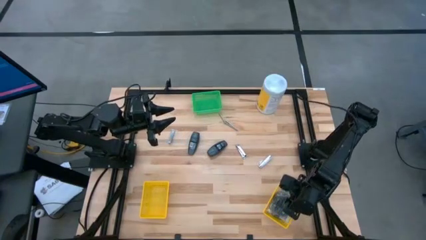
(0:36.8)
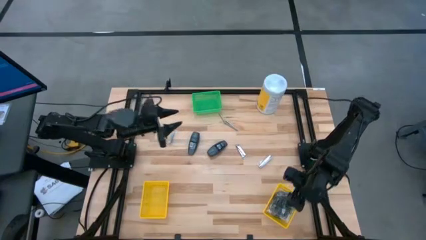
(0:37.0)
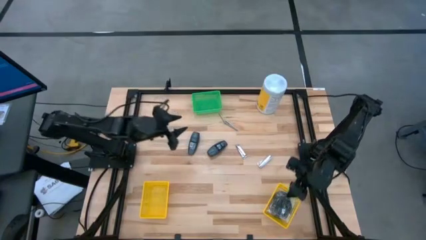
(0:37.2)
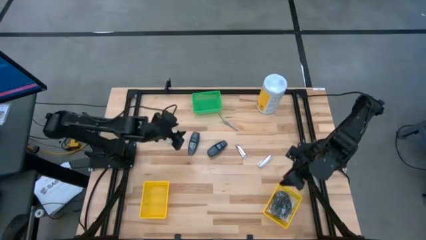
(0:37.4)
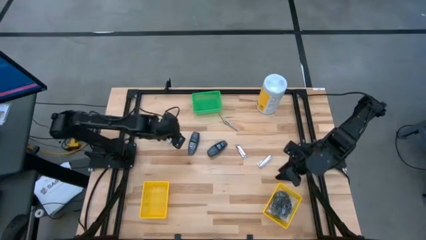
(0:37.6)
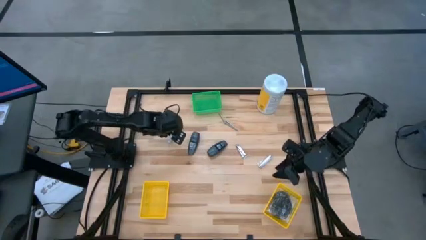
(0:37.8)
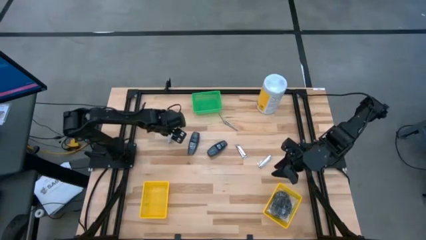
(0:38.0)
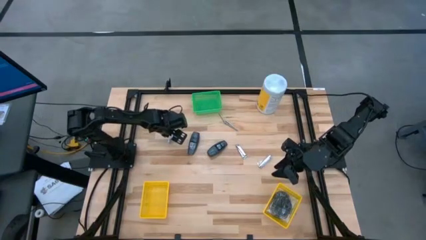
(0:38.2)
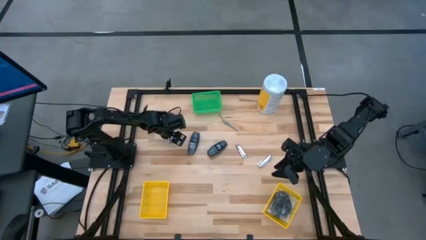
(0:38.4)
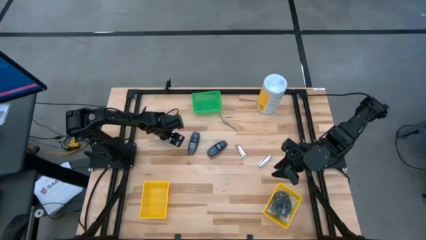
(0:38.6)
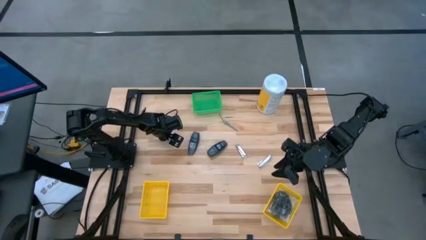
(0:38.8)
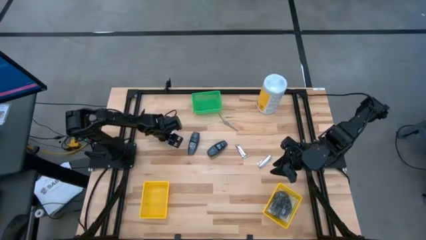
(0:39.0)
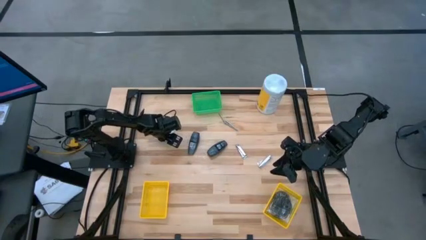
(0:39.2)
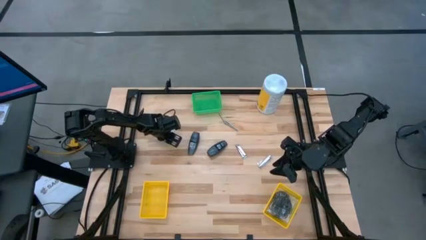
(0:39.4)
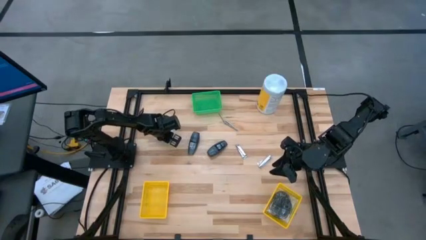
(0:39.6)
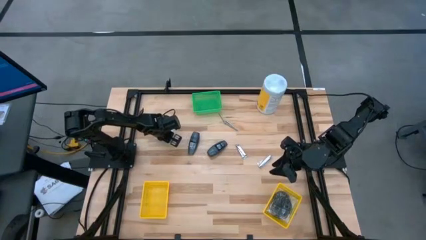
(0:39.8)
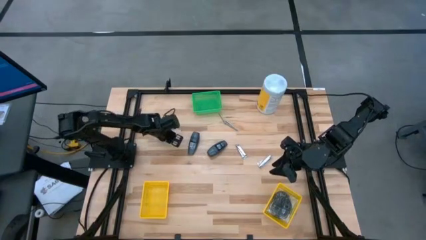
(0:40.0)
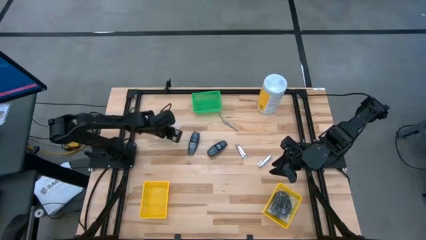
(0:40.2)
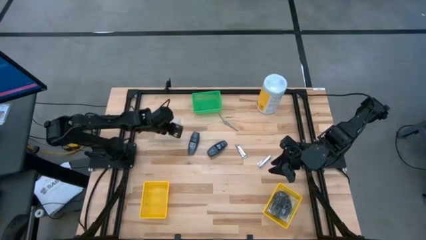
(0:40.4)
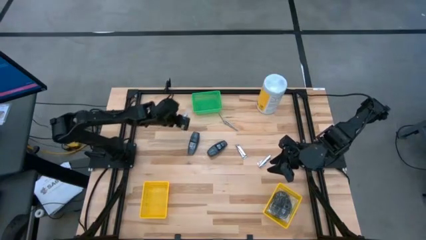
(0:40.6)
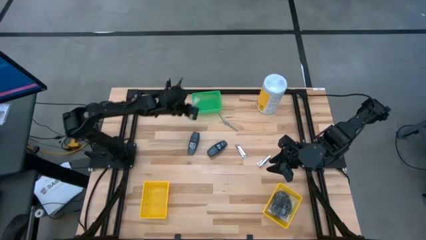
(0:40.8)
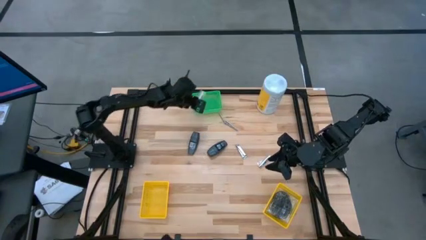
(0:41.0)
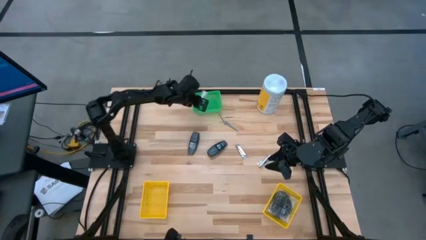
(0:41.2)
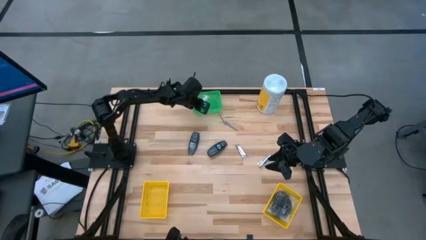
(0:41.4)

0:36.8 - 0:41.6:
Task: Pick & Place Travel size toiletries
Put the silver nail cutter into the green bin

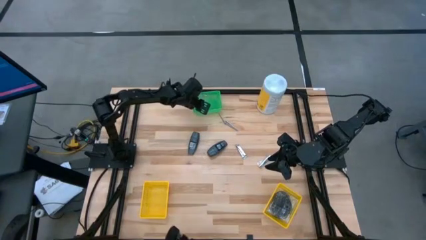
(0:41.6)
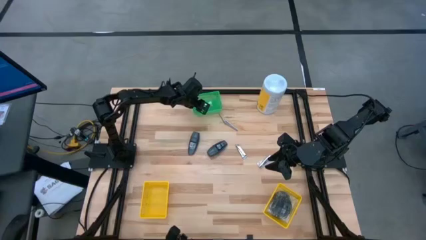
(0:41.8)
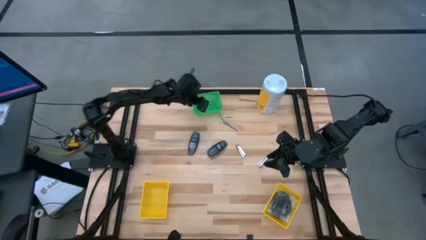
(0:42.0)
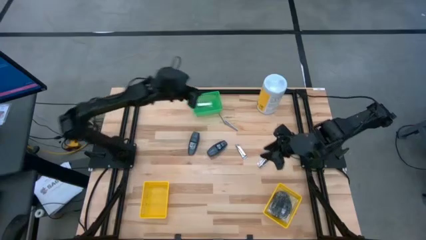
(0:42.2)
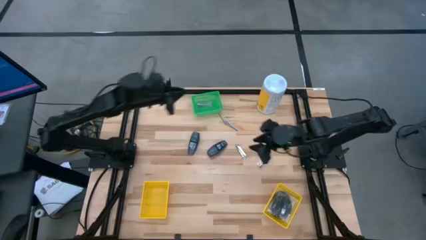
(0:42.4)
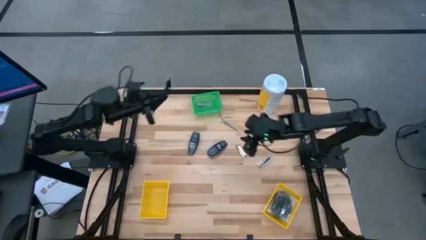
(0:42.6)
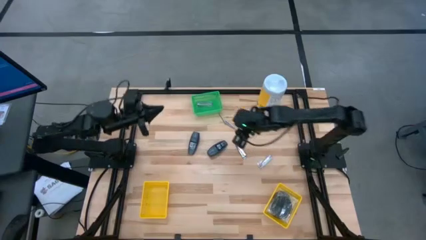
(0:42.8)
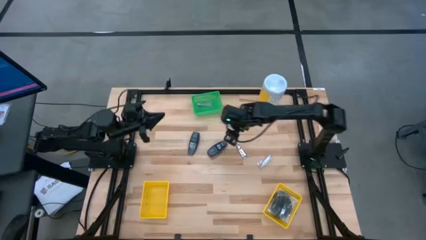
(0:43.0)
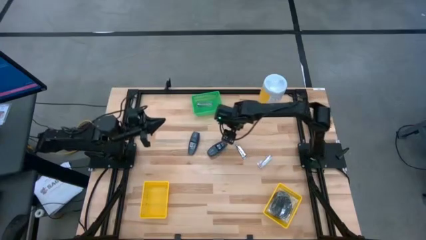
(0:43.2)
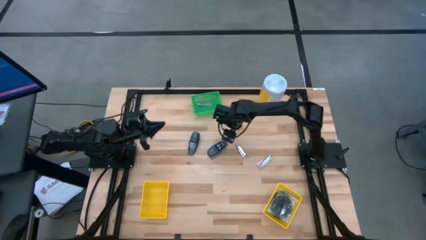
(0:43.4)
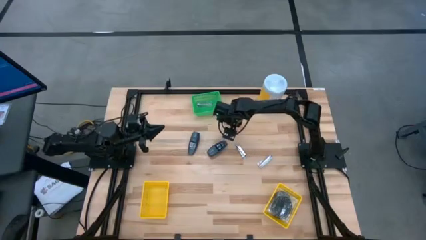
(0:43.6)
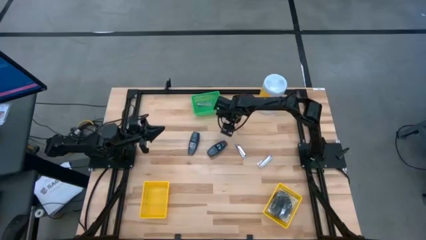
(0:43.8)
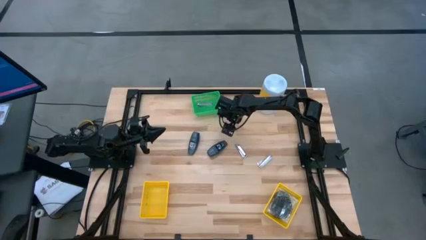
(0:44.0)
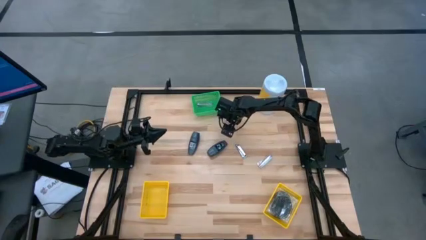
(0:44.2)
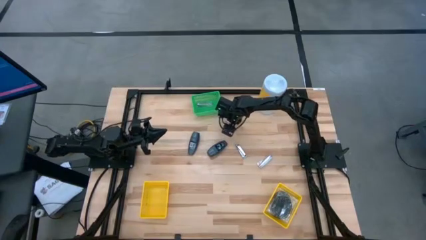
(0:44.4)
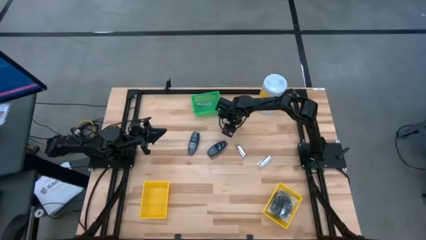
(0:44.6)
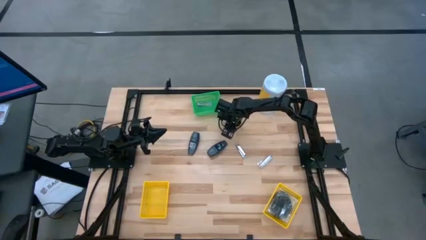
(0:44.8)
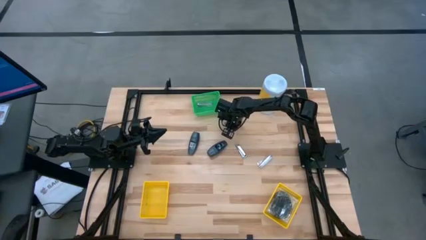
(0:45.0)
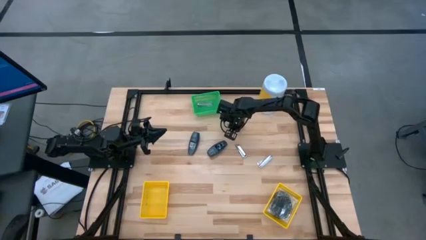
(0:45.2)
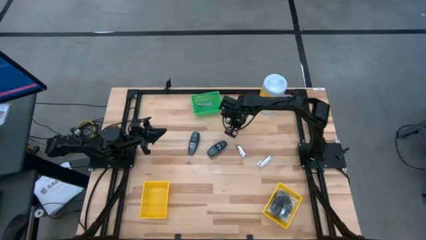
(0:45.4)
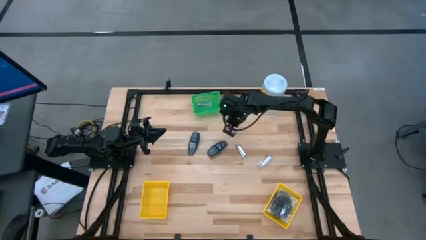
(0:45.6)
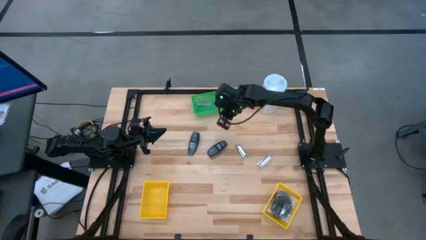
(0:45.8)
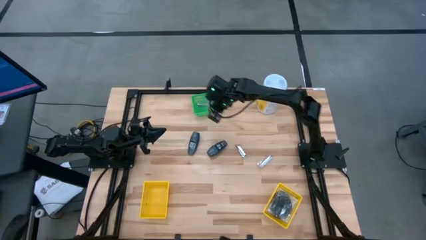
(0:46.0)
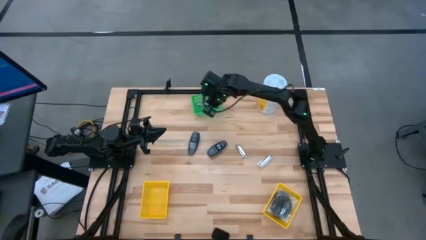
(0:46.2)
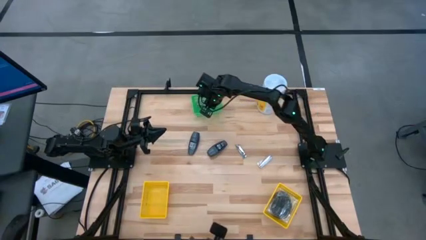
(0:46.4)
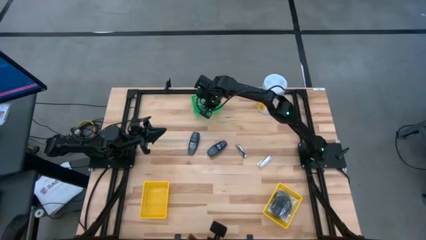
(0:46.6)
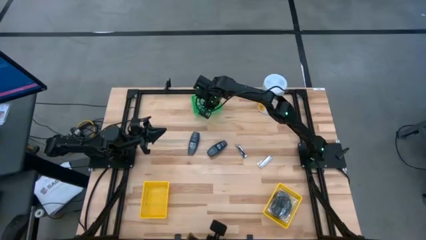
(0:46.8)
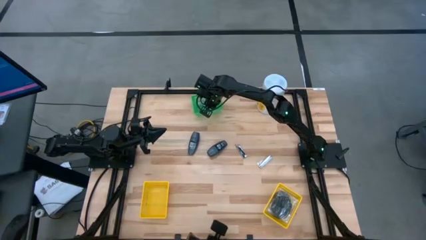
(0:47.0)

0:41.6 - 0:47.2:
Put the silver nail cutter into the green bin

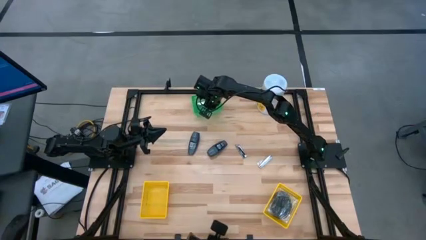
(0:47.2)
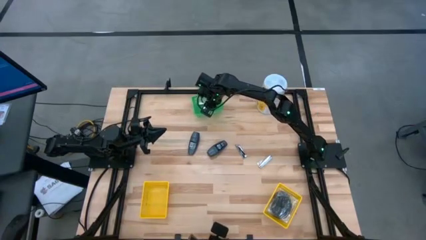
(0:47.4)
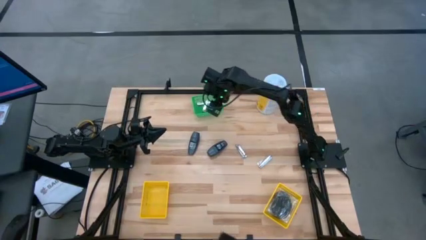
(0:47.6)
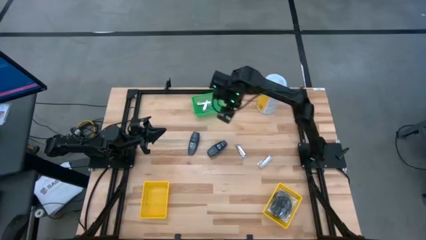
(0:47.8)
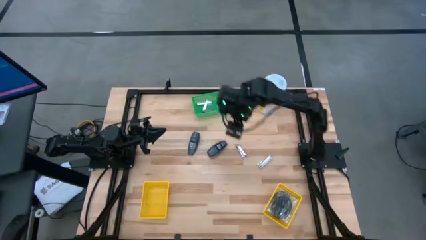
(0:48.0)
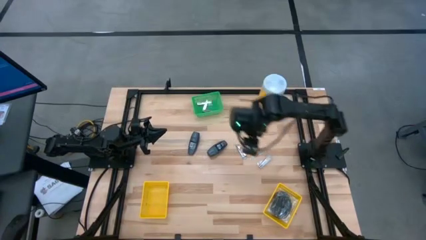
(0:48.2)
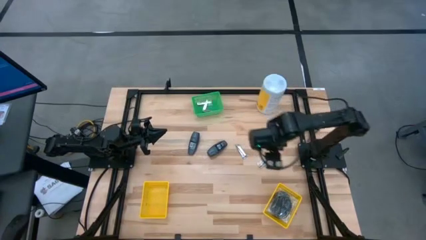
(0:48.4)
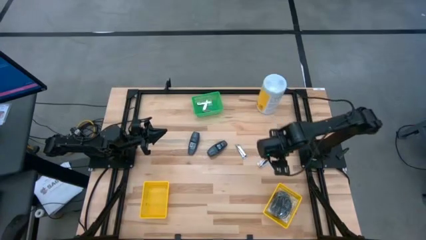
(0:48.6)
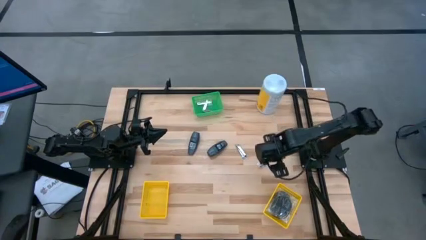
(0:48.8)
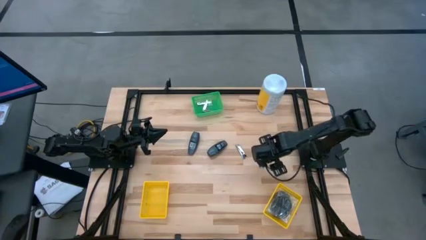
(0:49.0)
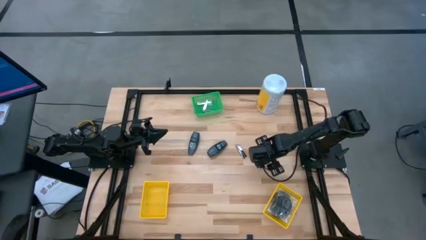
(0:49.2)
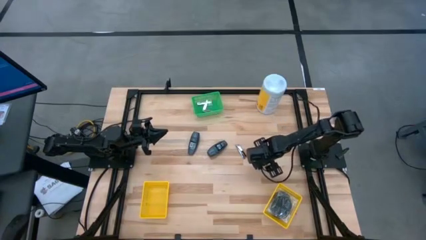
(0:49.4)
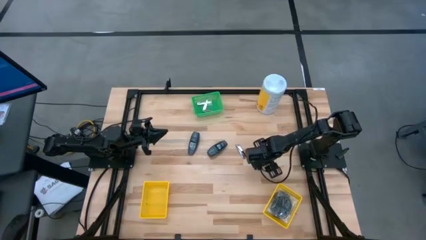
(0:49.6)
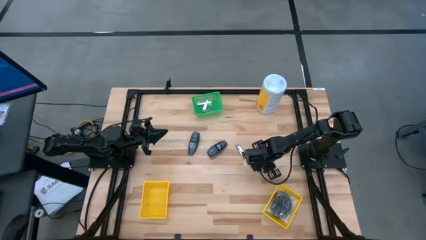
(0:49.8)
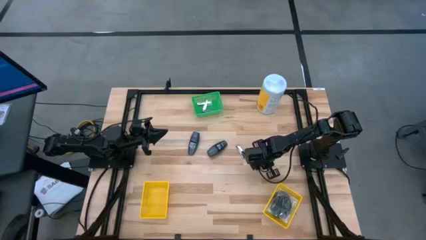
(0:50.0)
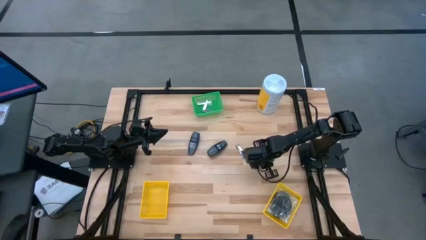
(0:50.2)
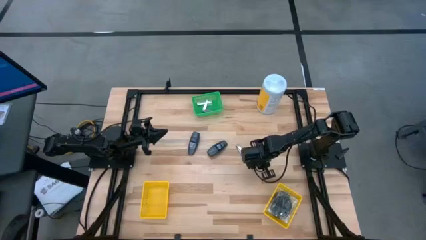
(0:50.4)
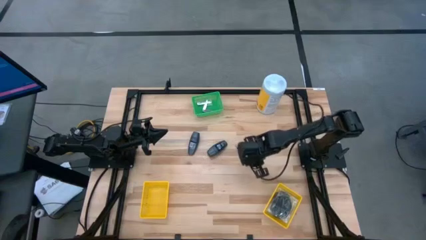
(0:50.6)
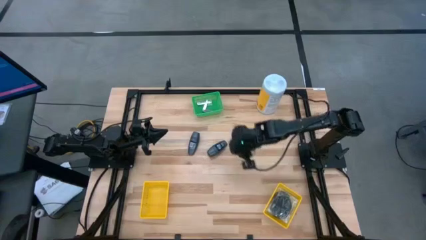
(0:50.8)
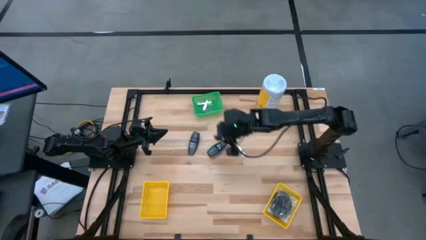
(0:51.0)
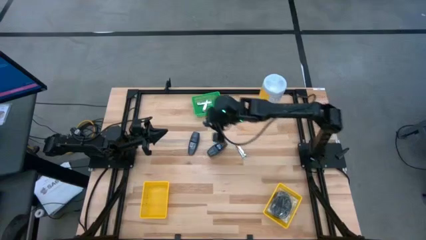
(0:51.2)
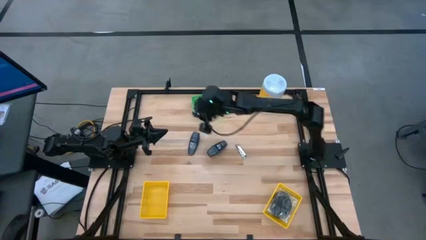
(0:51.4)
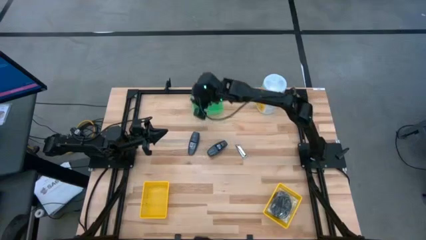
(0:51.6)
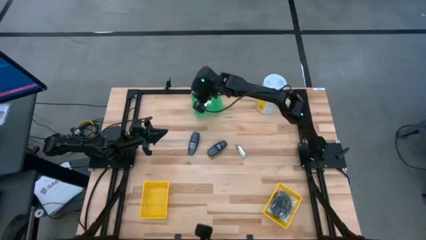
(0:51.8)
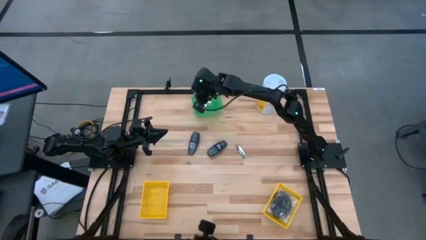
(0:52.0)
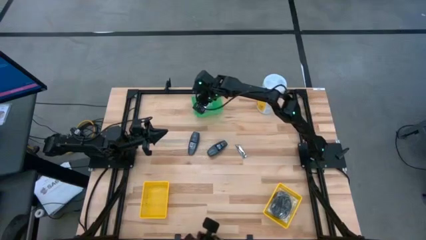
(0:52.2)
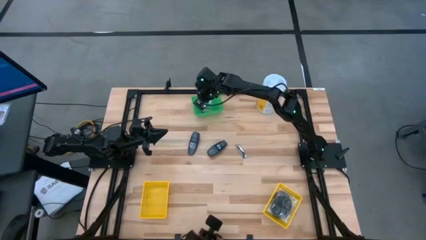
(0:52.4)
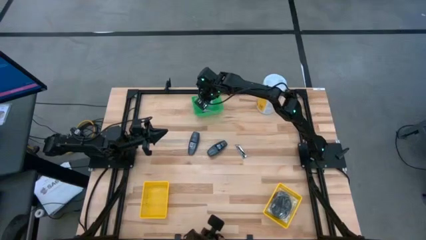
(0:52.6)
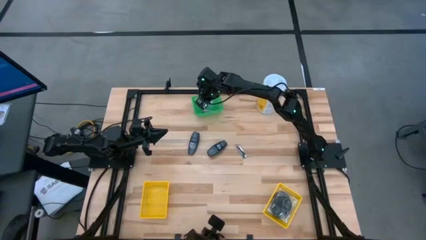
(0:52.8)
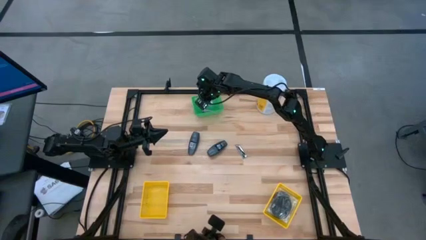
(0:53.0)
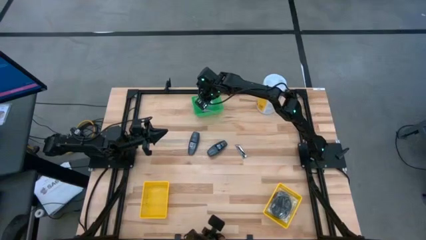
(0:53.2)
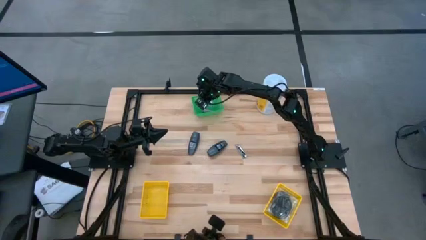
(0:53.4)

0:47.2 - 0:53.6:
Put the silver nail cutter into the green bin
